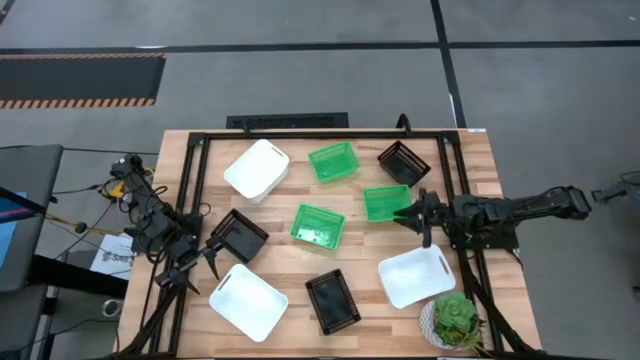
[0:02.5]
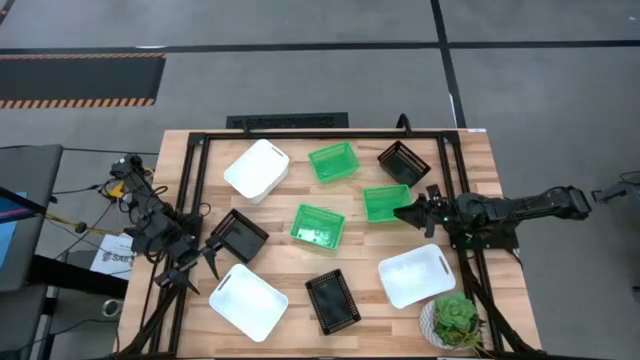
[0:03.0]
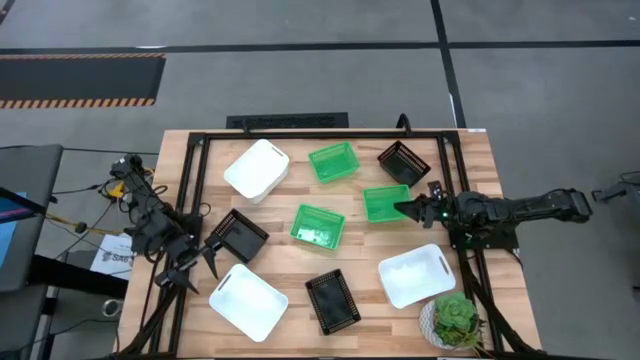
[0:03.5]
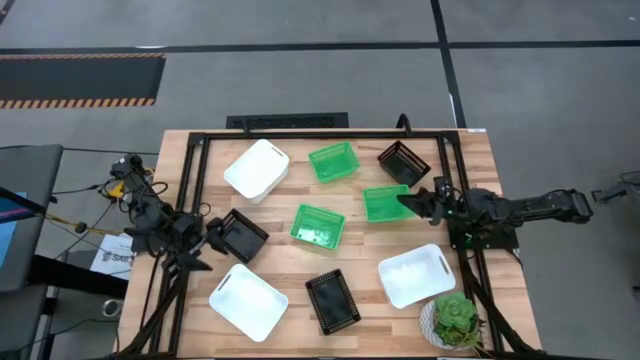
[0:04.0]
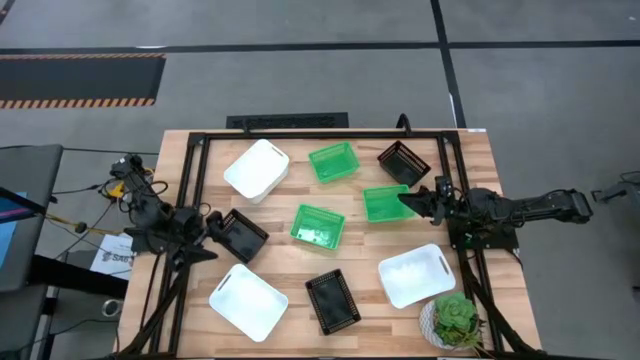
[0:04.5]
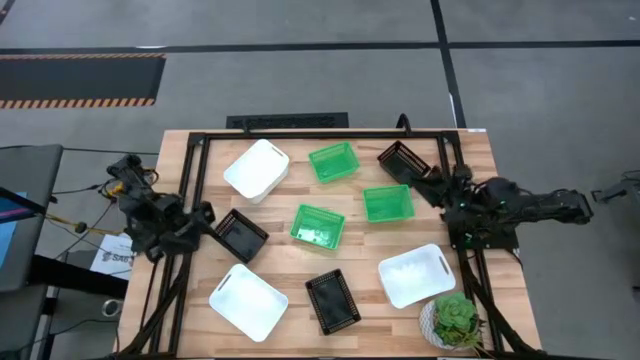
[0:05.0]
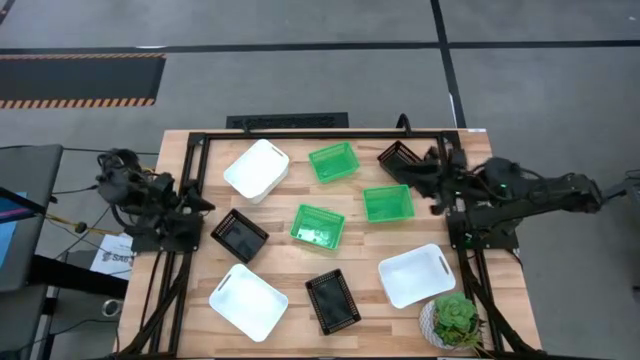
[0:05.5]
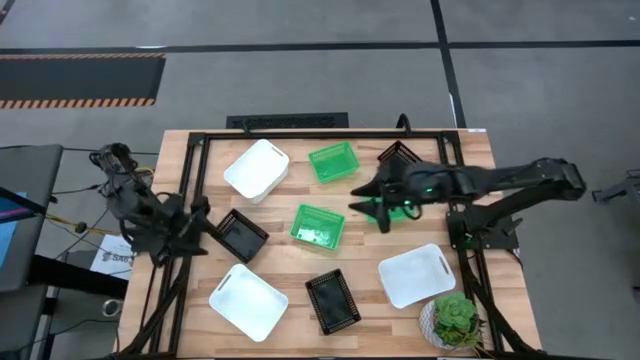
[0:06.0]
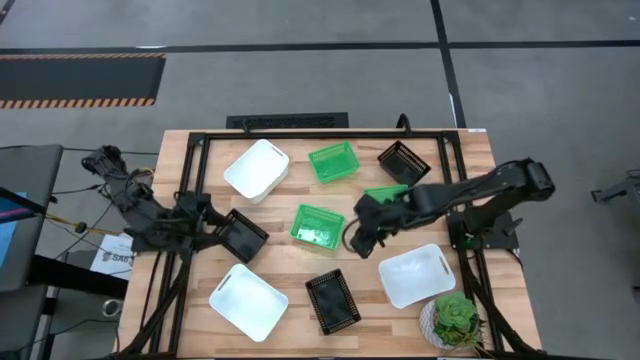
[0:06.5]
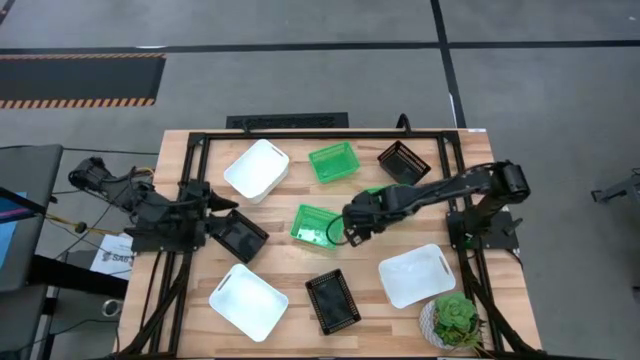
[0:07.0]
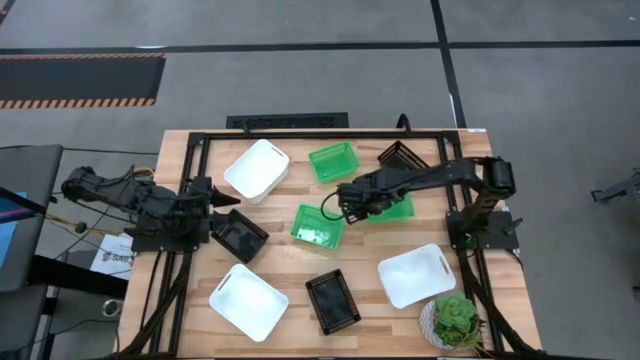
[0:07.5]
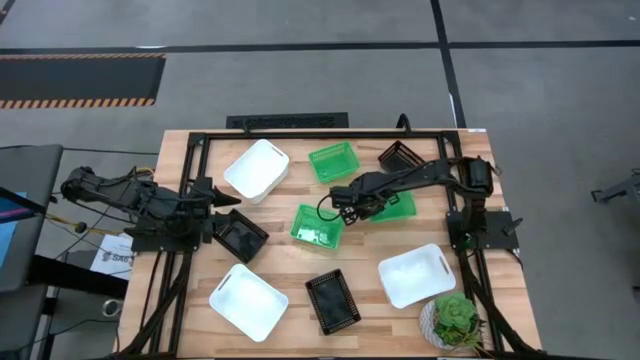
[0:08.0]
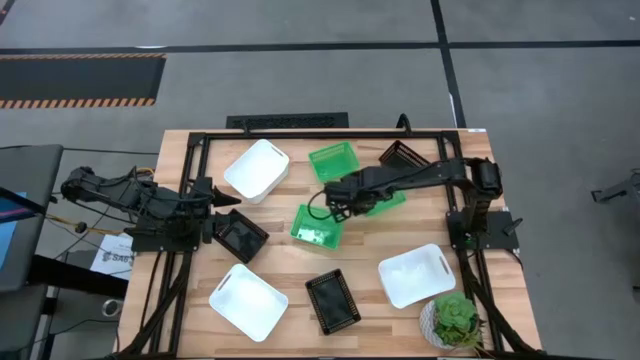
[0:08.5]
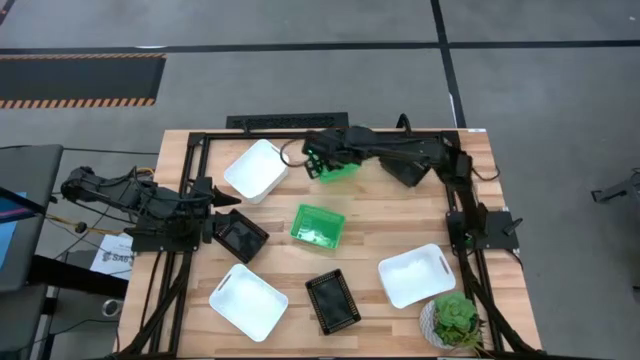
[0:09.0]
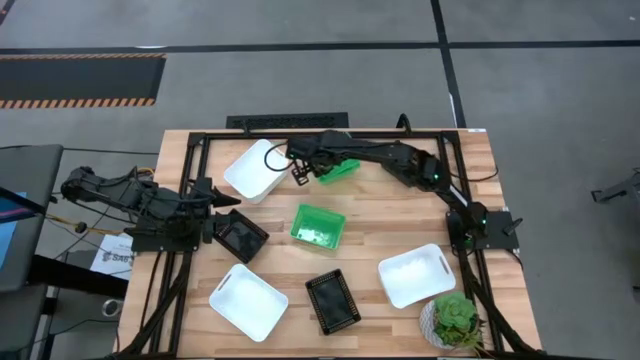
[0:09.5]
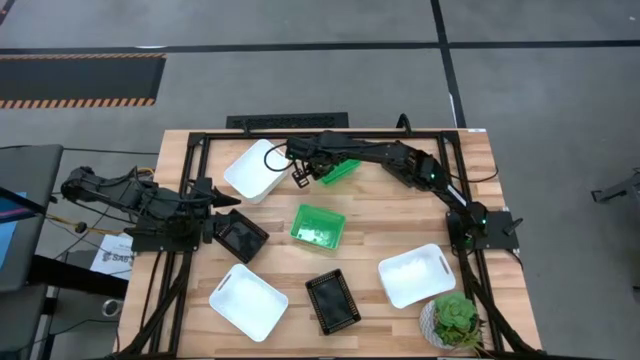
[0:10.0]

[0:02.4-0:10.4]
Stack the bottom right green bin on top of the top green bin

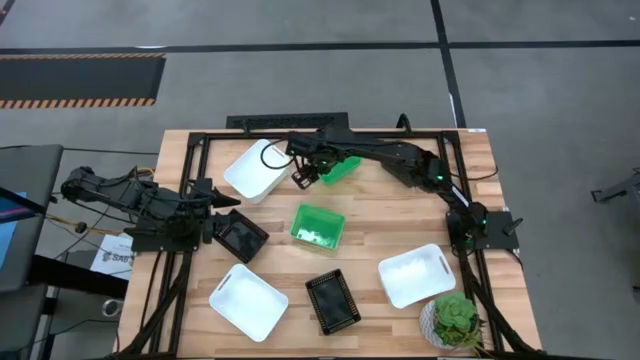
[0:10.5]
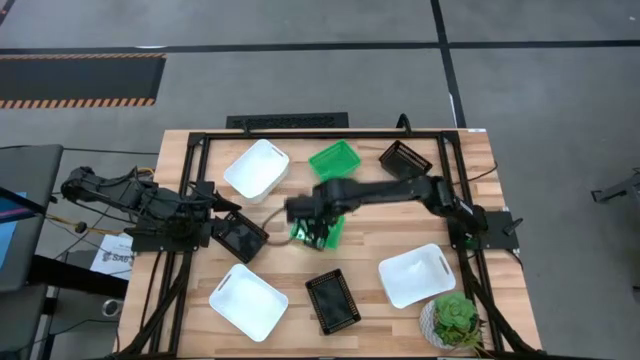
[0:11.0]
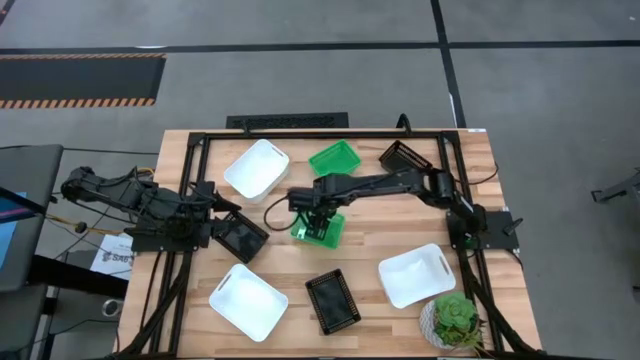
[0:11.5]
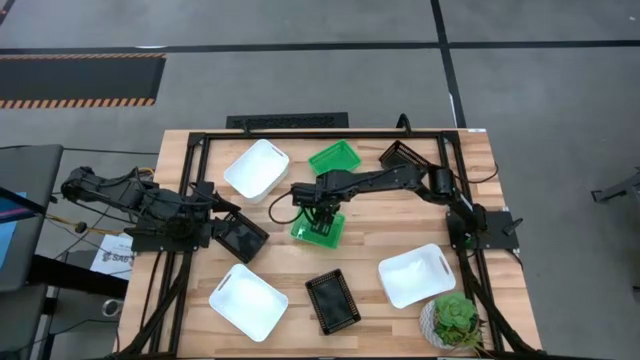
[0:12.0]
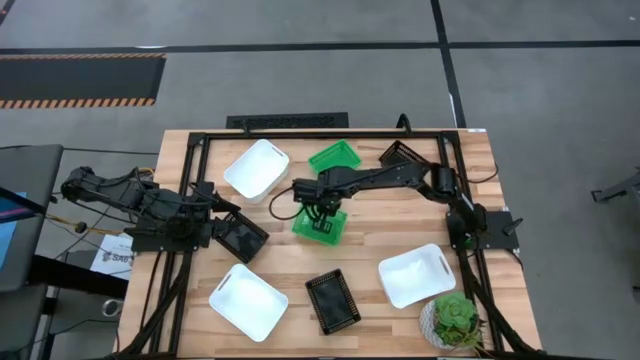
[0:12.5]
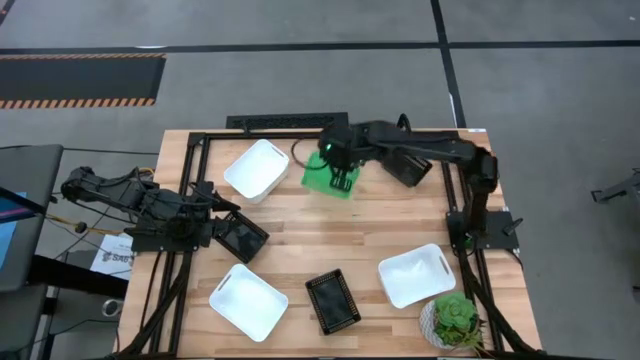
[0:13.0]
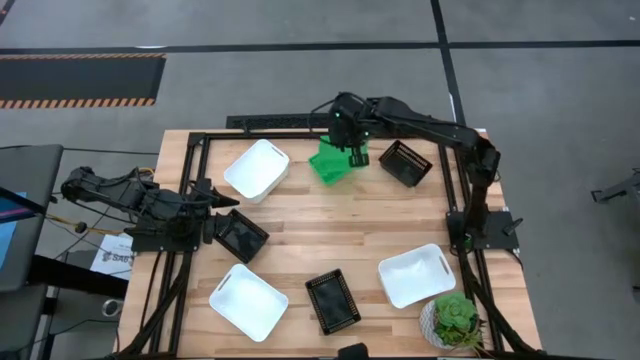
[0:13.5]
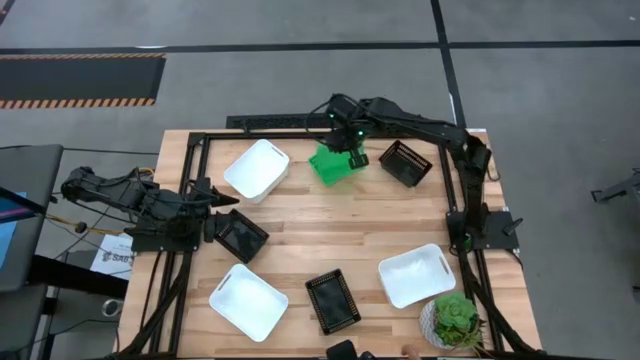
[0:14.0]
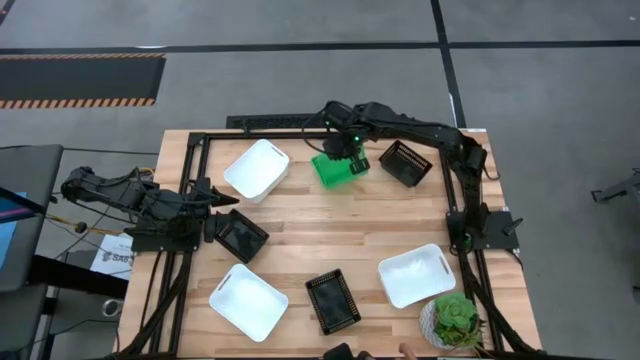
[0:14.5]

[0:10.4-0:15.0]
Stack the bottom green bin on top of the green bins

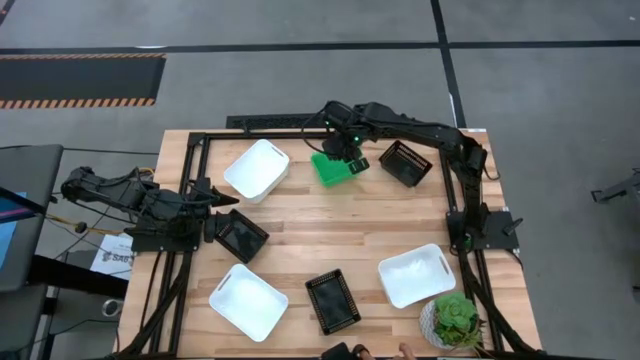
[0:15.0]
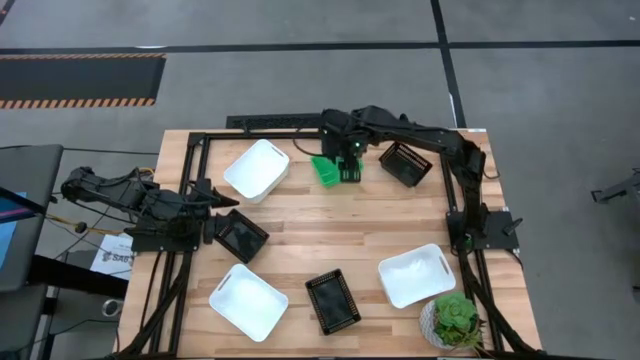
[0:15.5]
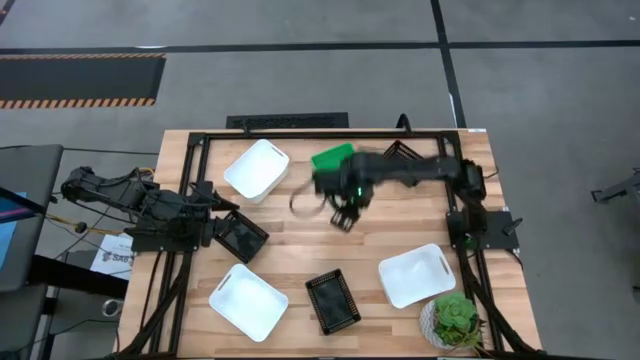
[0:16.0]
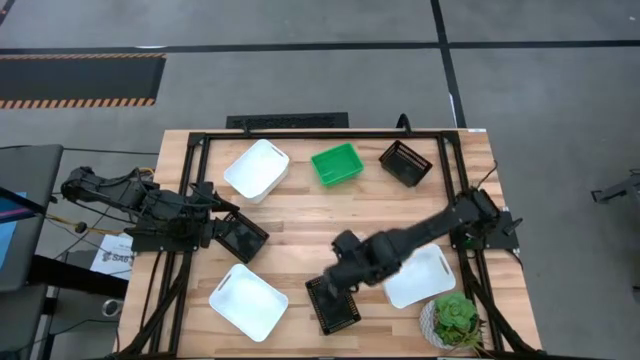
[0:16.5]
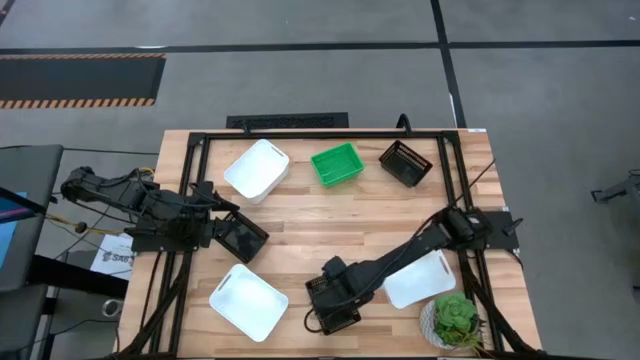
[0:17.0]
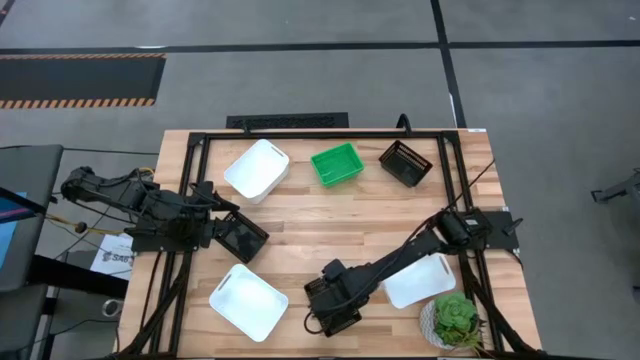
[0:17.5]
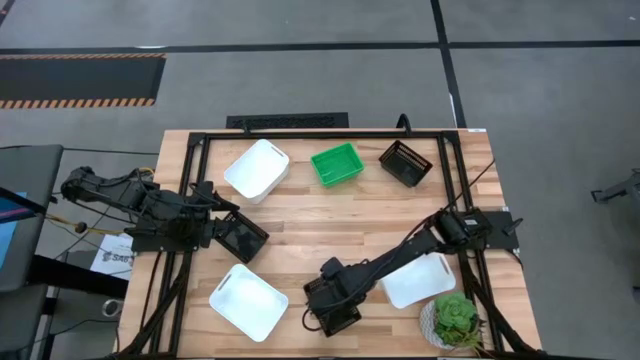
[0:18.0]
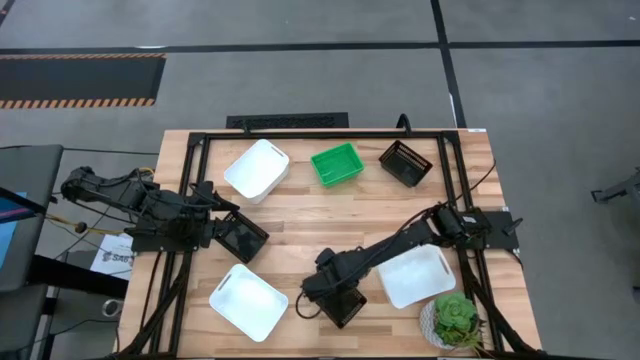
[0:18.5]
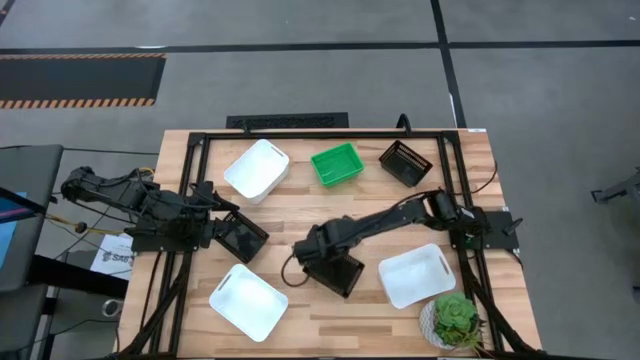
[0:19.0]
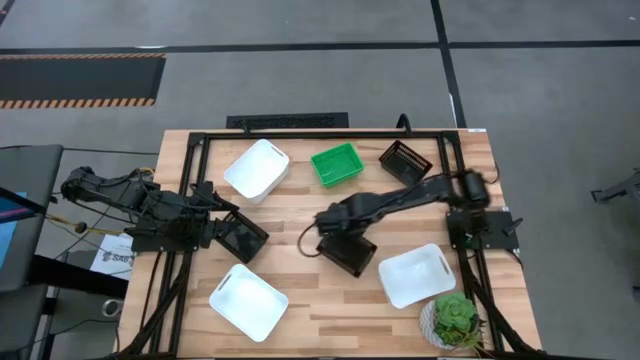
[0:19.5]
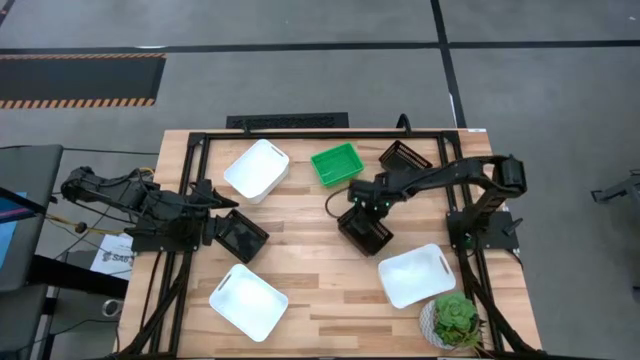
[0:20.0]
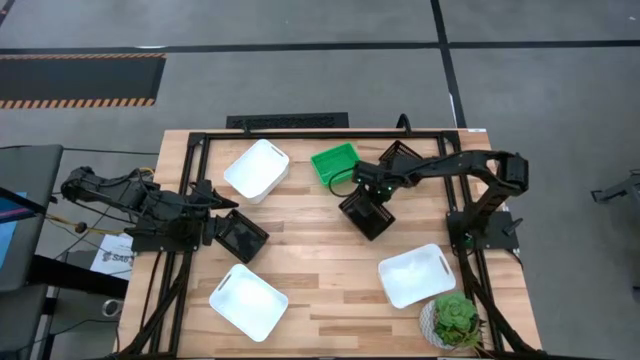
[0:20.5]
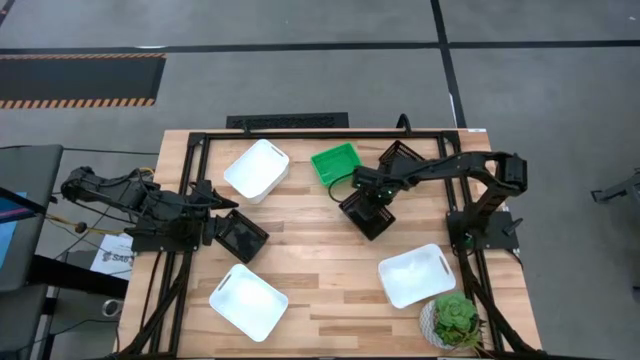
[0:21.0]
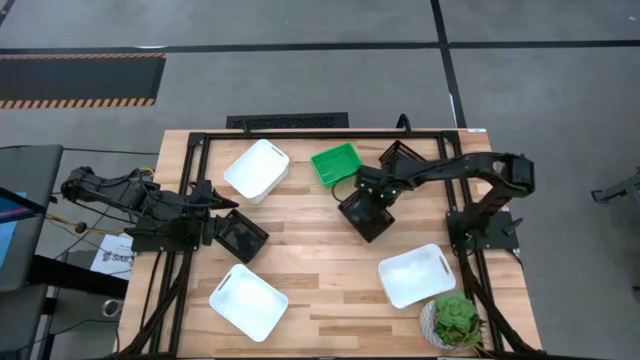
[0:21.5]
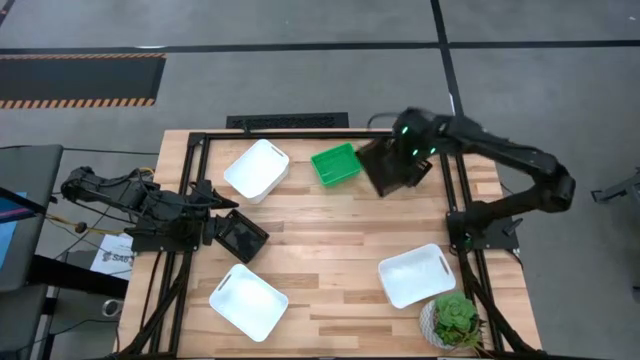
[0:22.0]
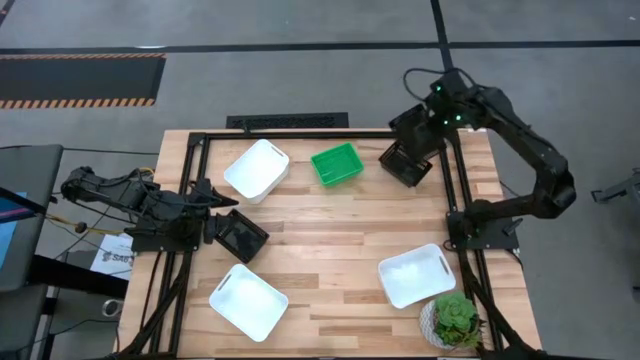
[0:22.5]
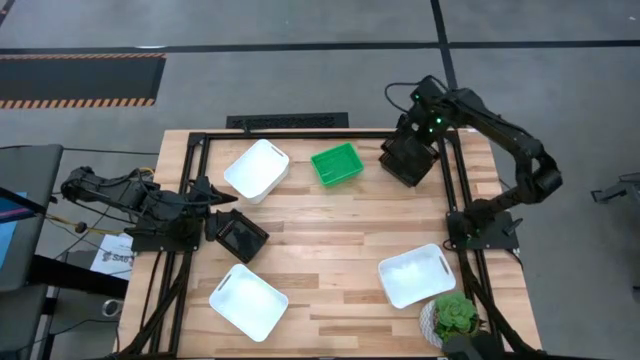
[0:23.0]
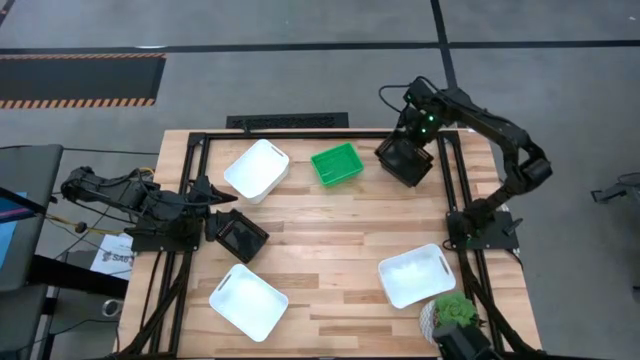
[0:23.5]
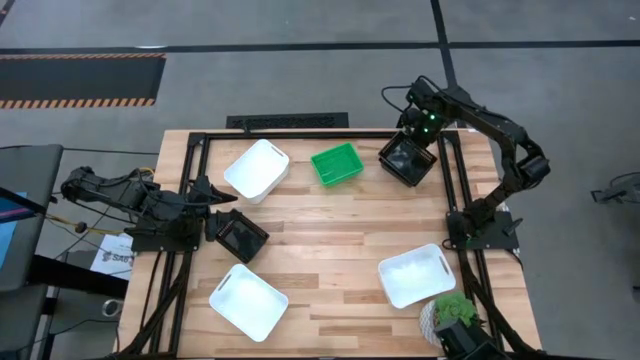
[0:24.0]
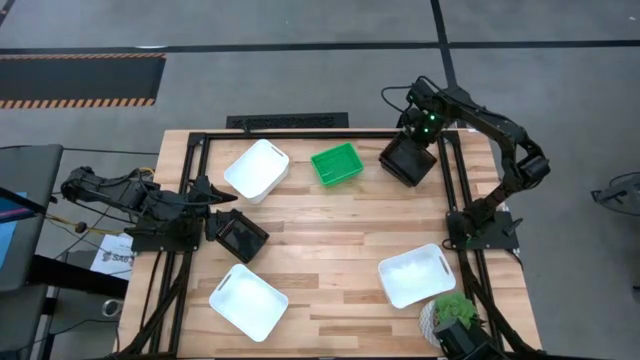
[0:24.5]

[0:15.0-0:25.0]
Put the bottom black bin on top of the top black bin
